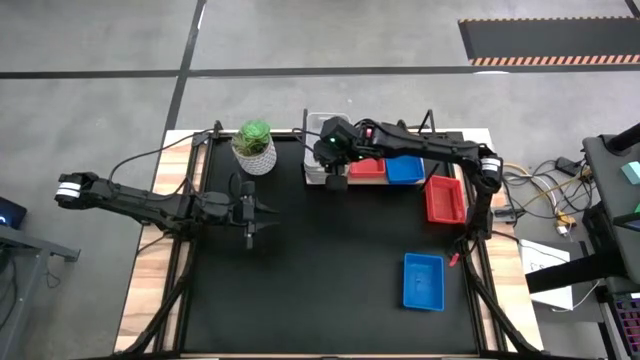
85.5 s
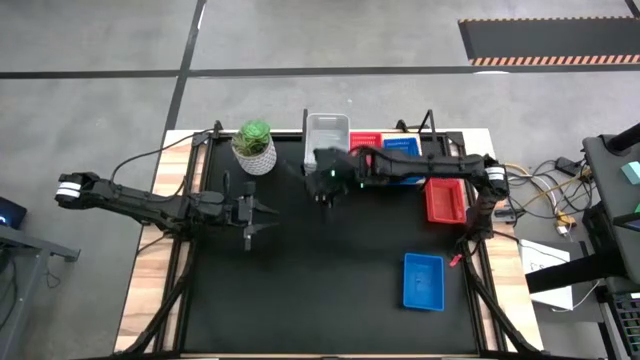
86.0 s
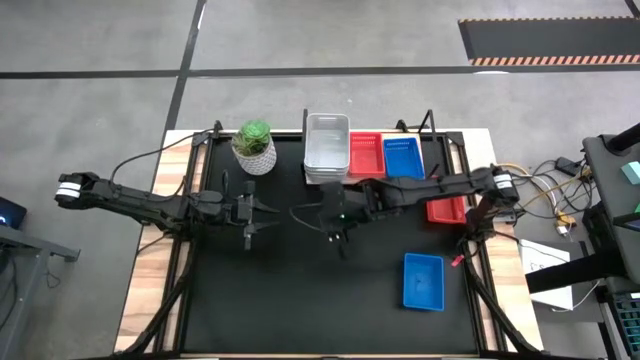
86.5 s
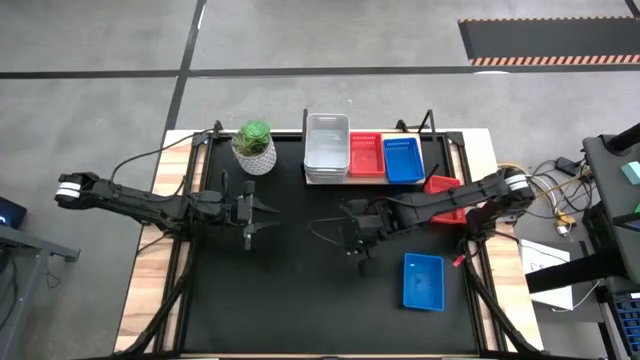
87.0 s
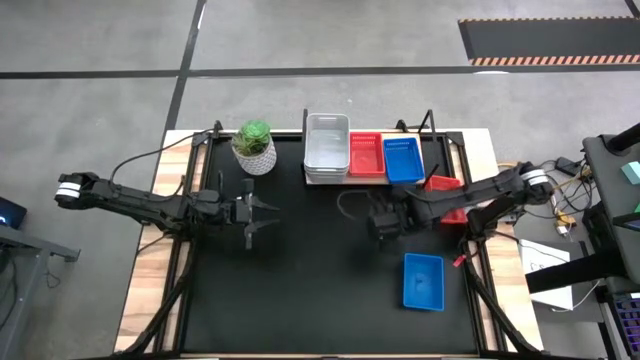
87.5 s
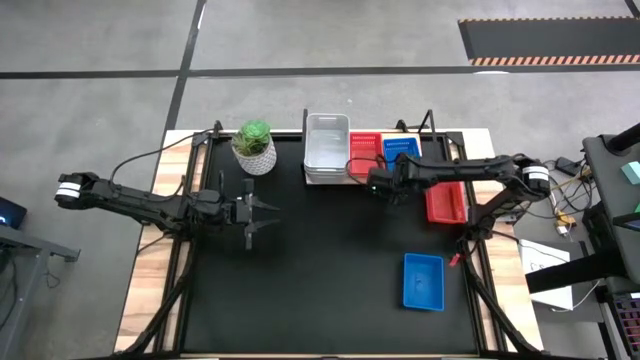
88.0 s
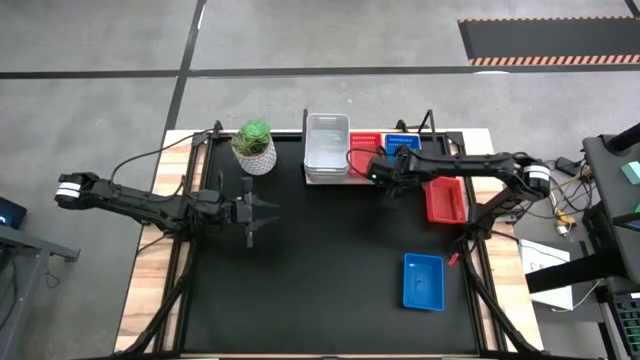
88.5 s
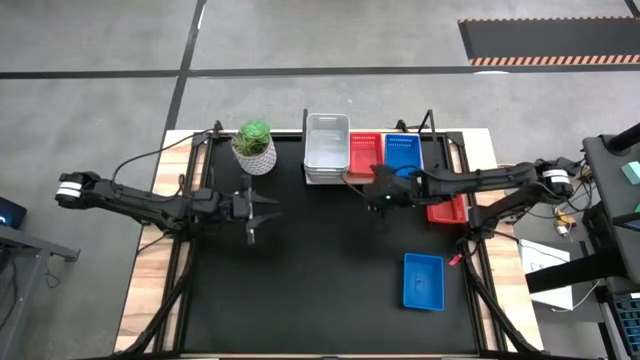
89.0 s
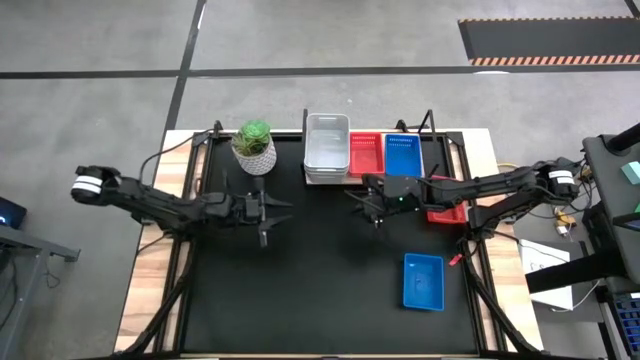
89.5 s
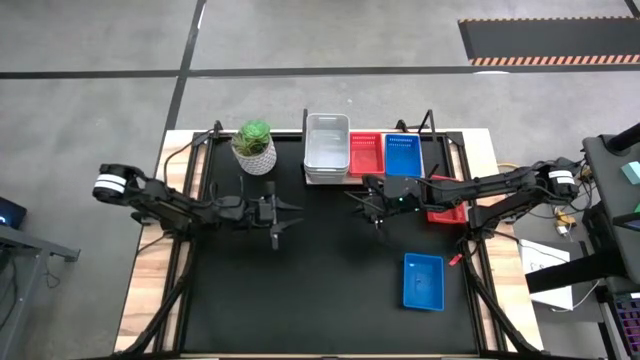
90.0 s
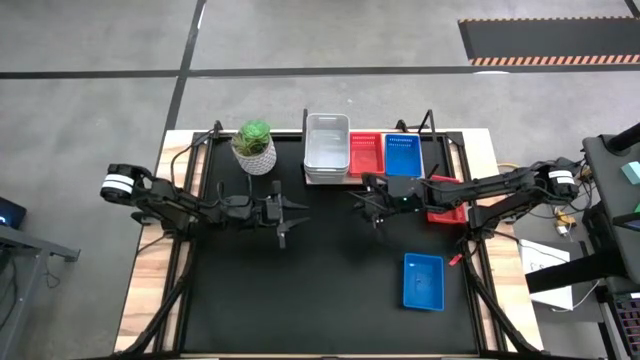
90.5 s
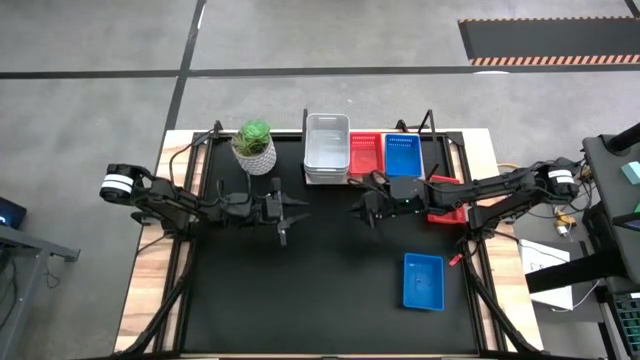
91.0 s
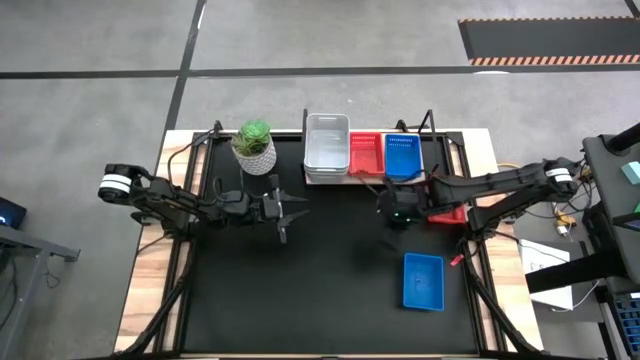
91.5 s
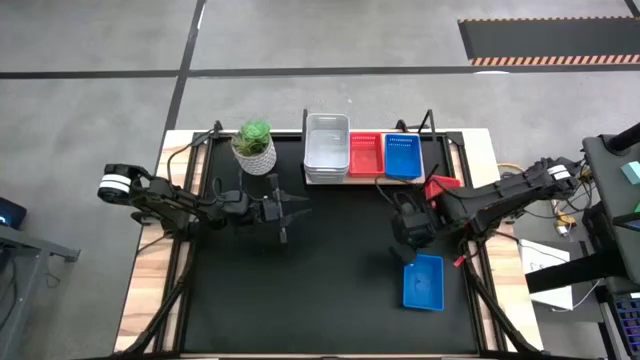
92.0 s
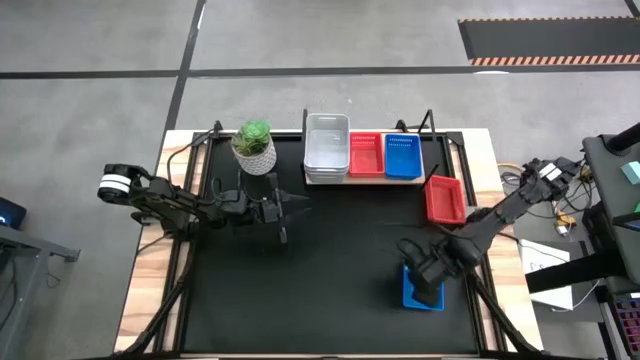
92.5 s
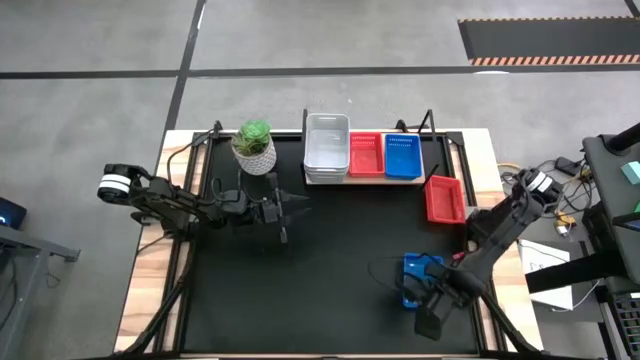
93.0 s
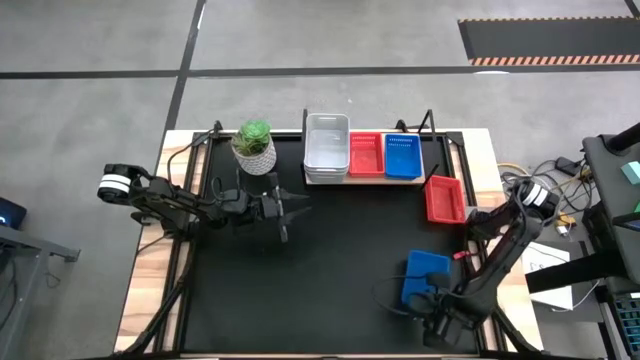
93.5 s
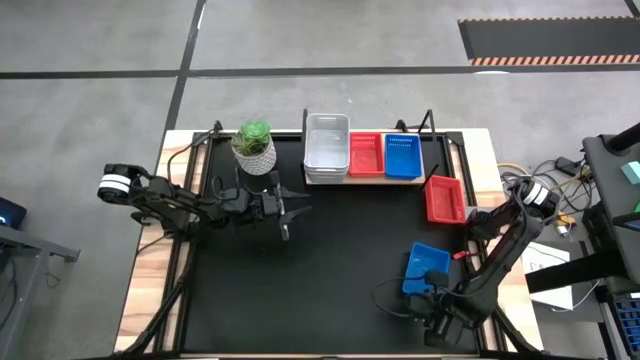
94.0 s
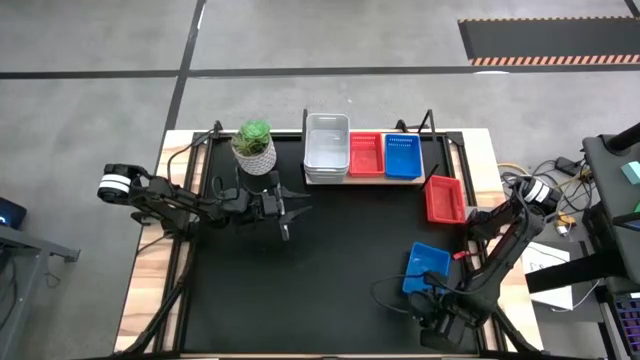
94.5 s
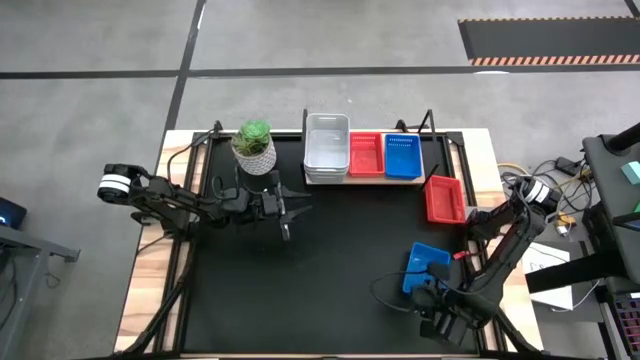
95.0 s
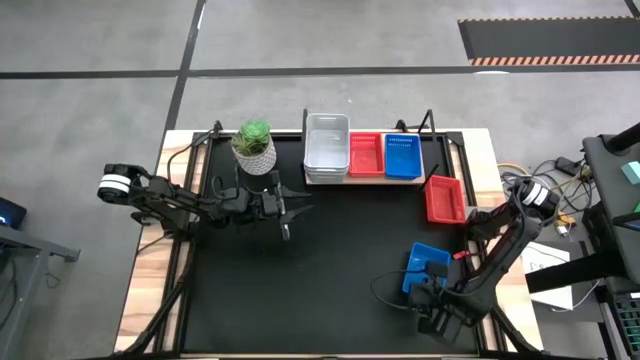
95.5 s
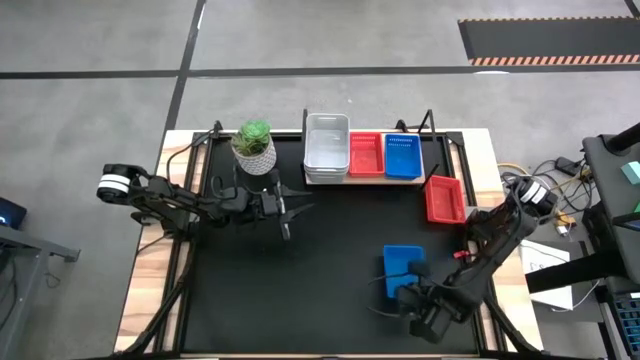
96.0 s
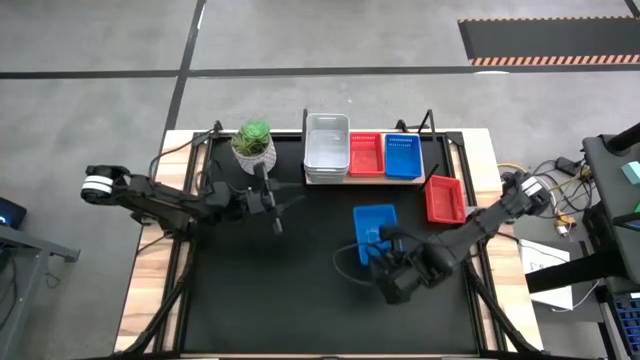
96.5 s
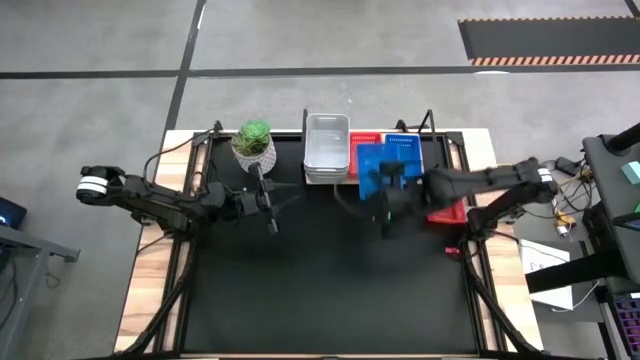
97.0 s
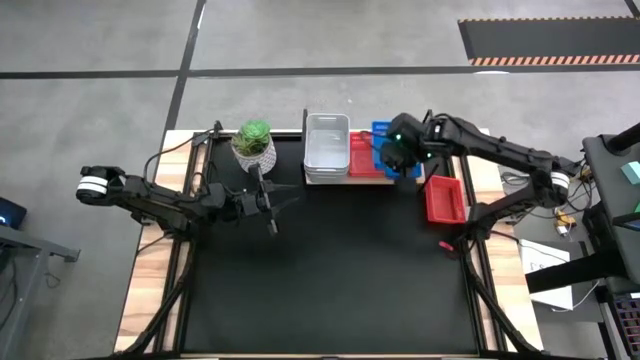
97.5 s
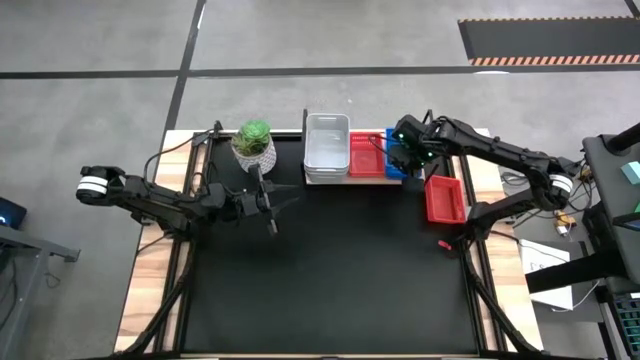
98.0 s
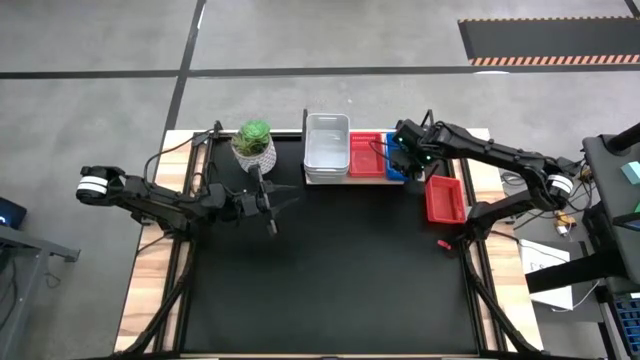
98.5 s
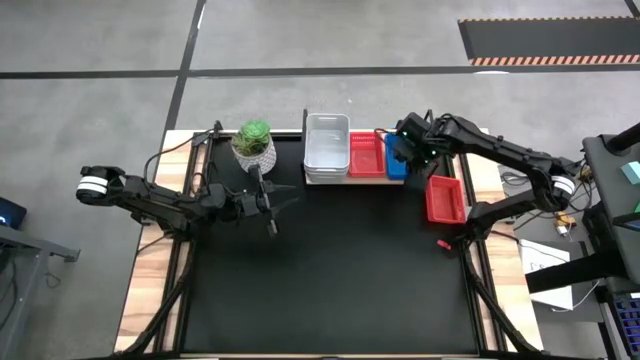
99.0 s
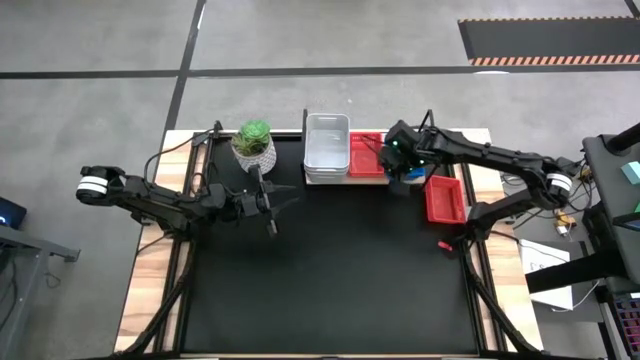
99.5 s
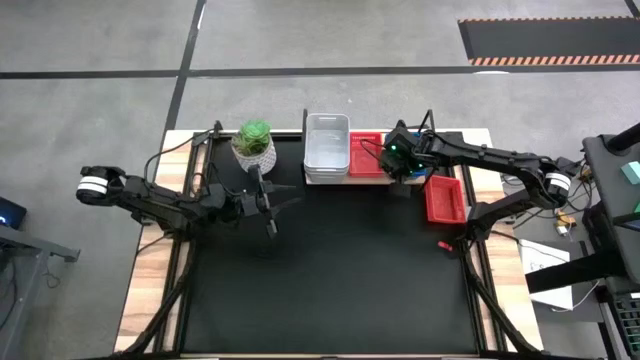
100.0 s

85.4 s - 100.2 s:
Task: Stack baskets on shelf by color
Stack the blue bin on the blue bin on the shelf

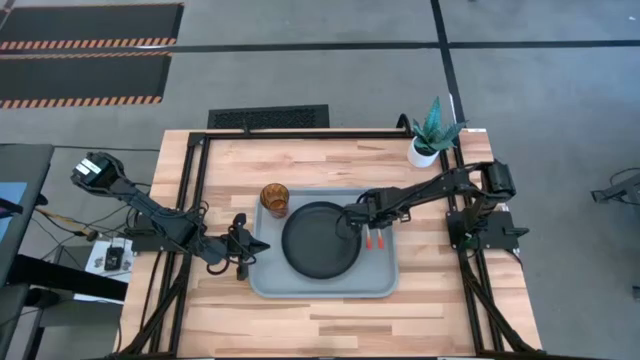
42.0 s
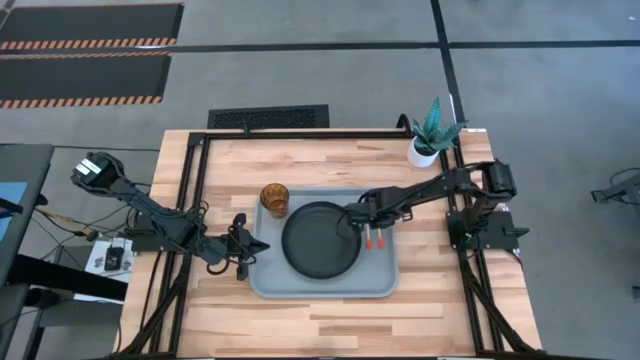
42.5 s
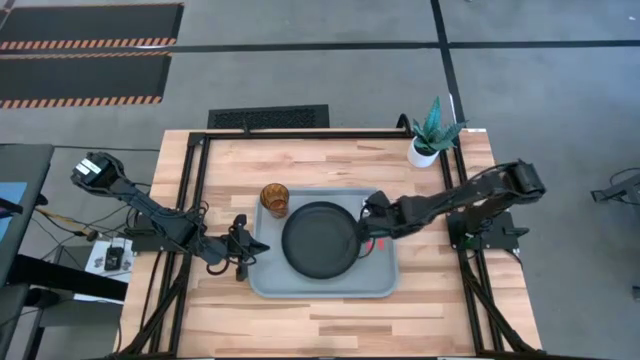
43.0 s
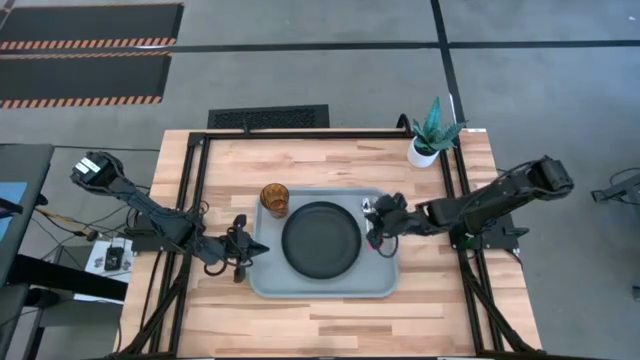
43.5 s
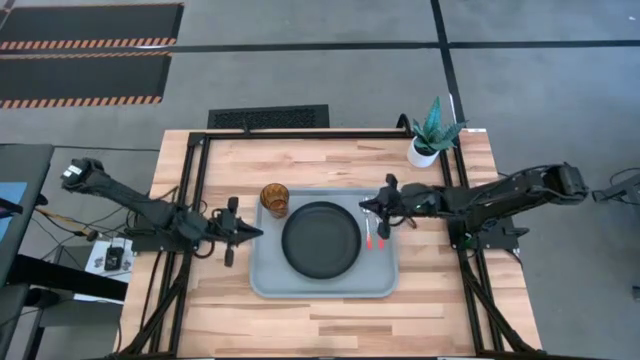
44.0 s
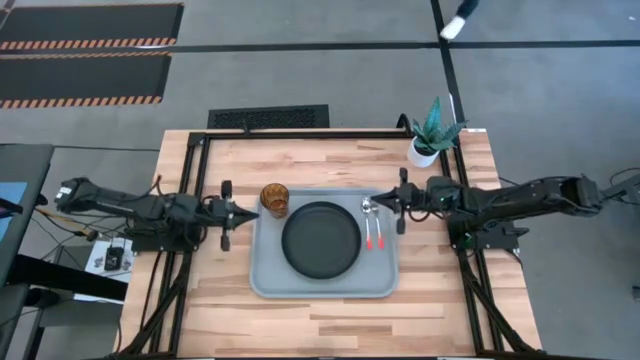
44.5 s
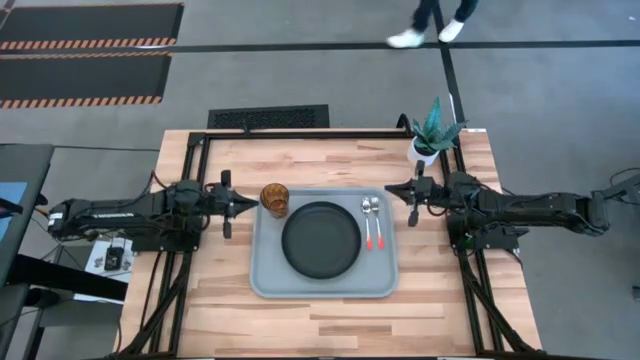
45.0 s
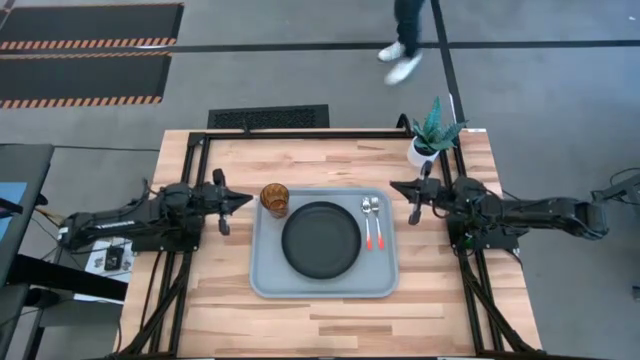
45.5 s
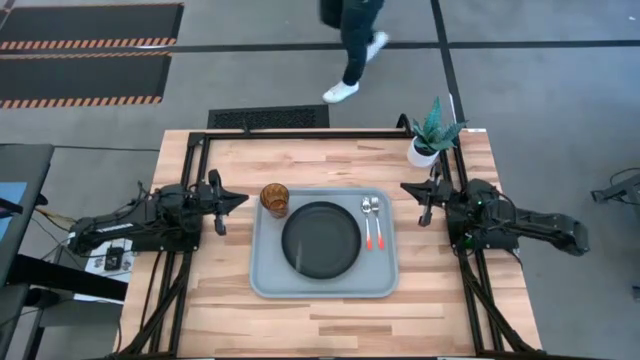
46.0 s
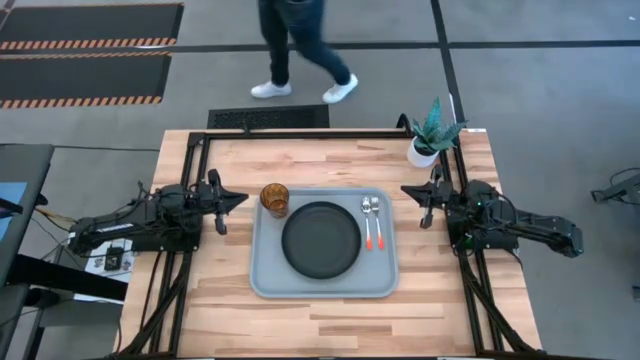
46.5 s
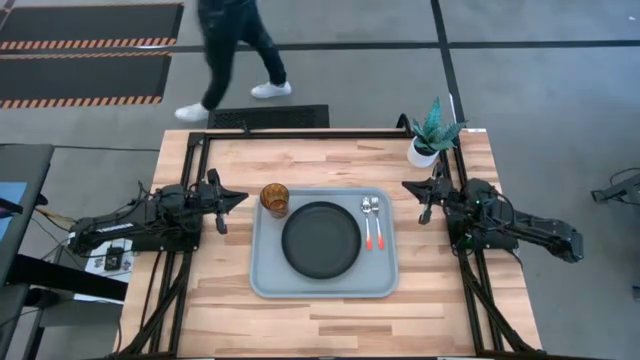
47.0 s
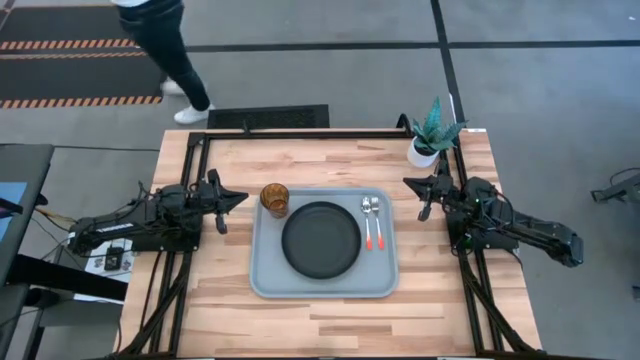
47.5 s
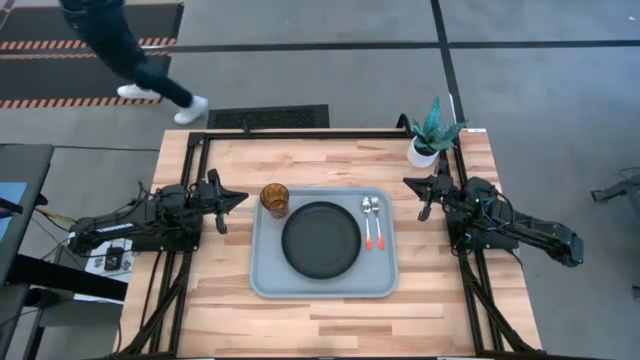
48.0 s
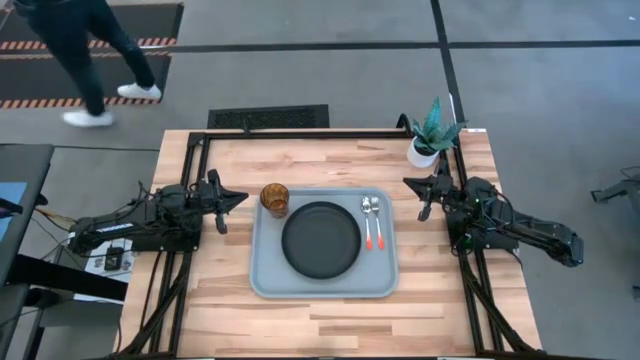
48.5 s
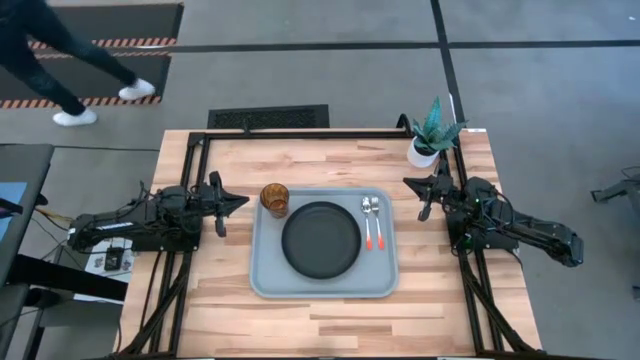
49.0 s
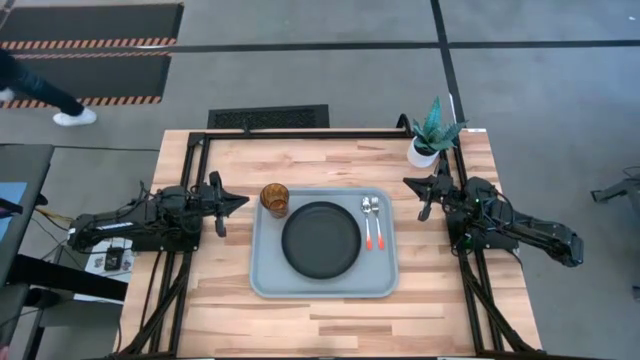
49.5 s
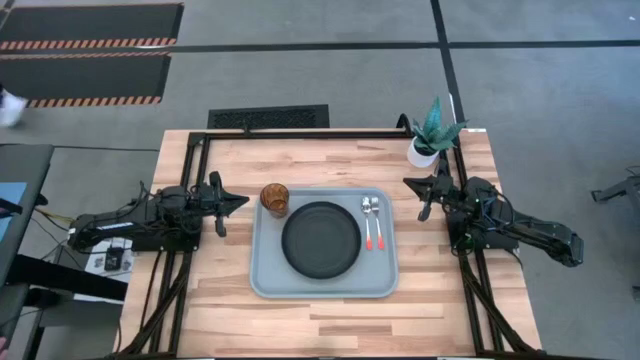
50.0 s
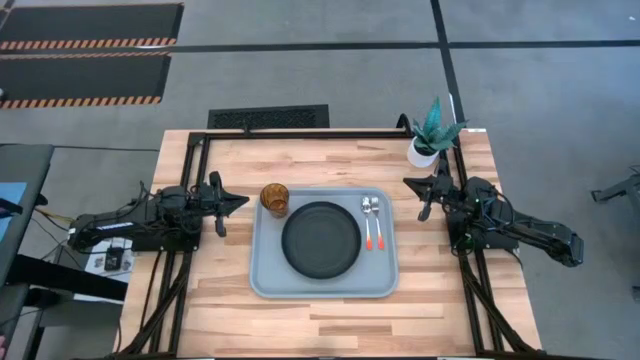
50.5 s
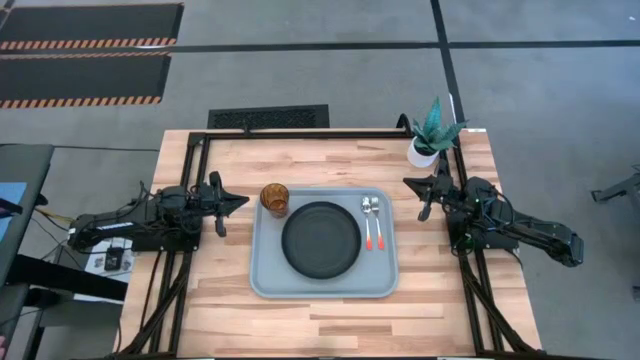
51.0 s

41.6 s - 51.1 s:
Task: Pick and place plate/cup/fork/spoon on tray
Return to Home Position
